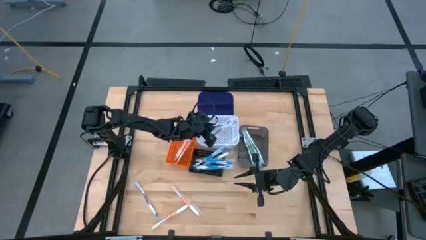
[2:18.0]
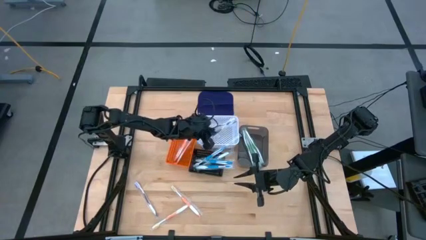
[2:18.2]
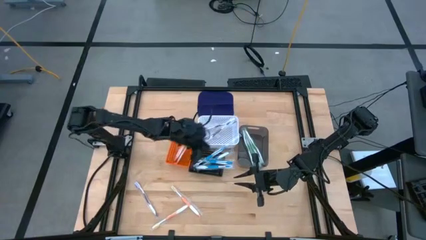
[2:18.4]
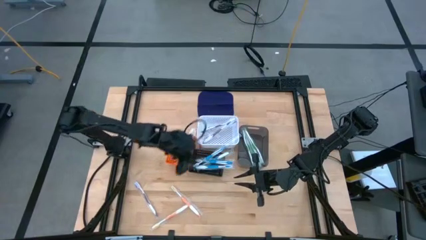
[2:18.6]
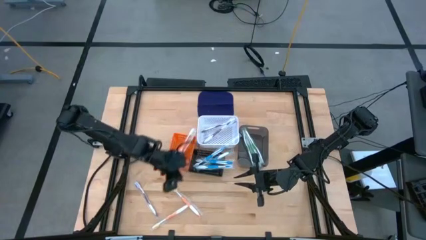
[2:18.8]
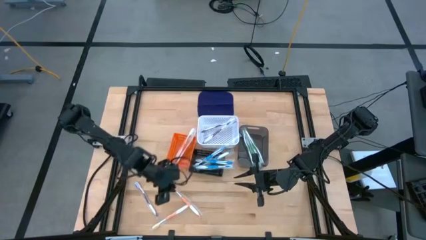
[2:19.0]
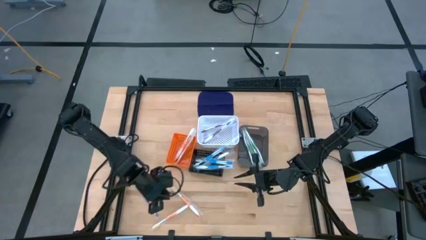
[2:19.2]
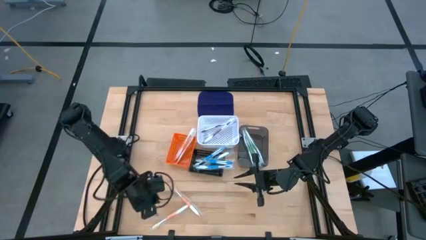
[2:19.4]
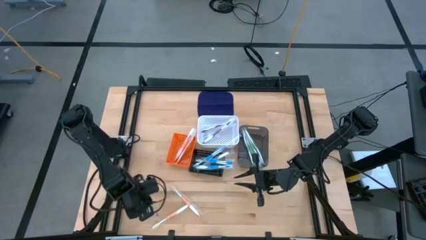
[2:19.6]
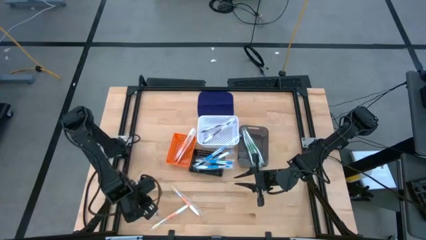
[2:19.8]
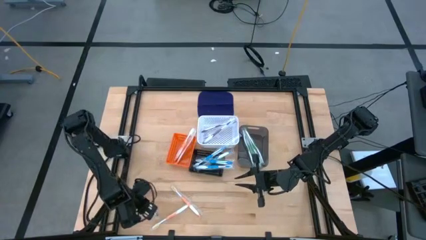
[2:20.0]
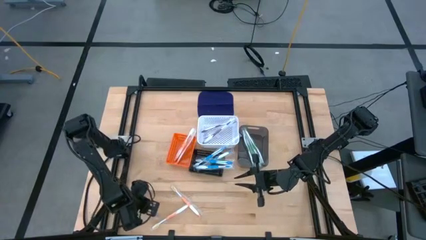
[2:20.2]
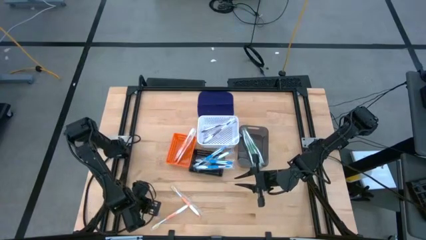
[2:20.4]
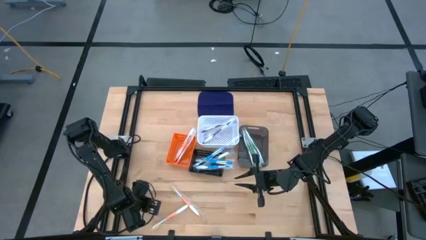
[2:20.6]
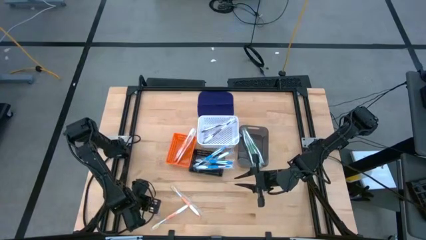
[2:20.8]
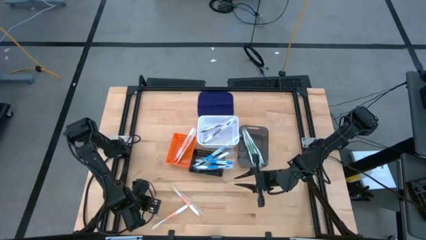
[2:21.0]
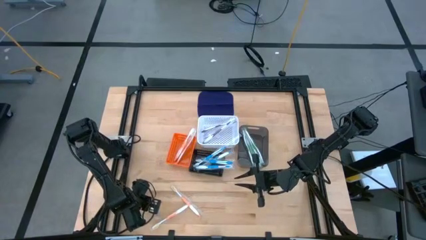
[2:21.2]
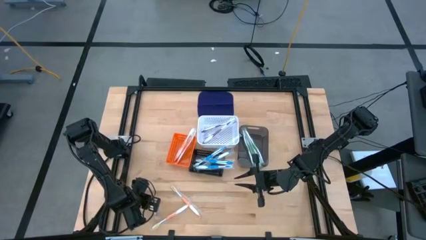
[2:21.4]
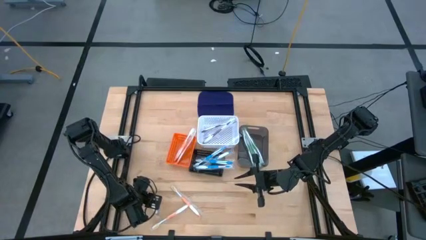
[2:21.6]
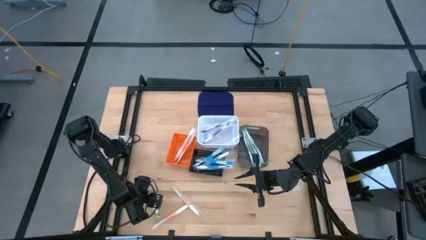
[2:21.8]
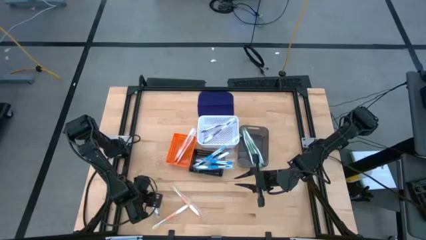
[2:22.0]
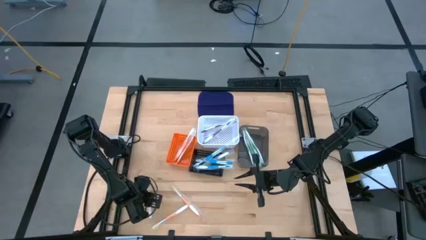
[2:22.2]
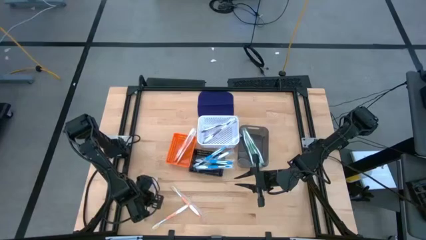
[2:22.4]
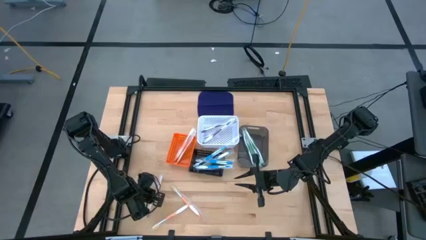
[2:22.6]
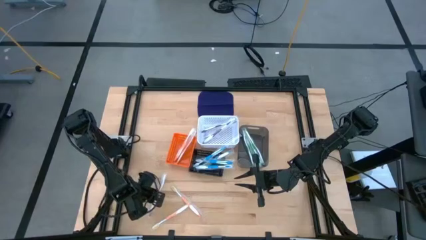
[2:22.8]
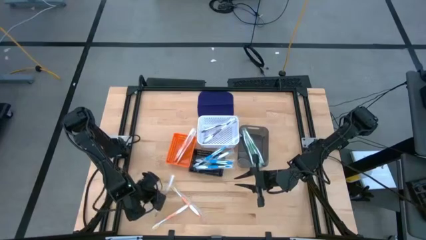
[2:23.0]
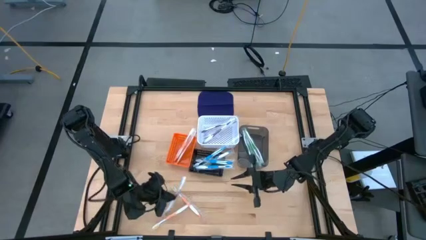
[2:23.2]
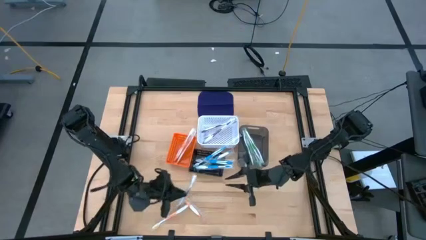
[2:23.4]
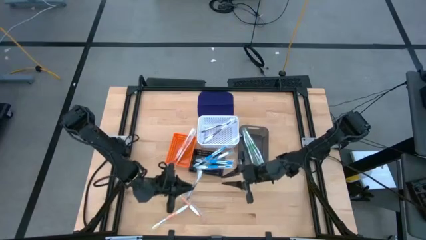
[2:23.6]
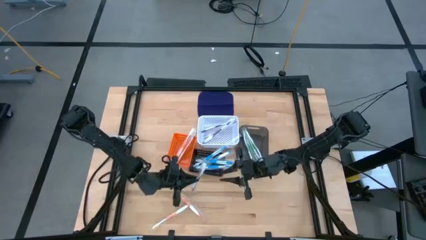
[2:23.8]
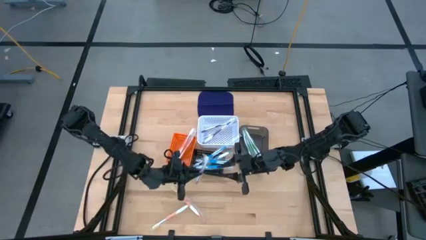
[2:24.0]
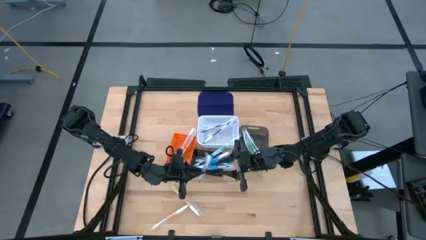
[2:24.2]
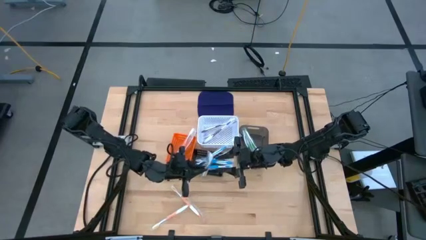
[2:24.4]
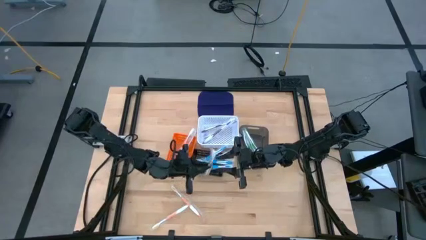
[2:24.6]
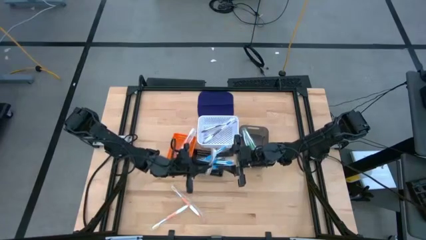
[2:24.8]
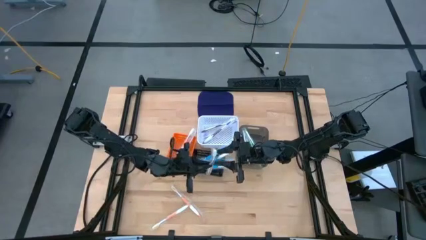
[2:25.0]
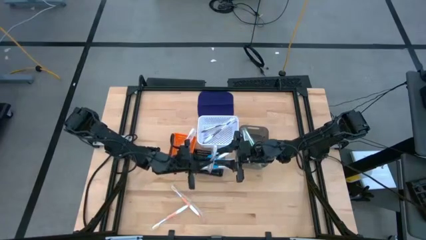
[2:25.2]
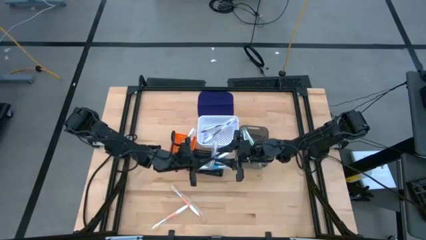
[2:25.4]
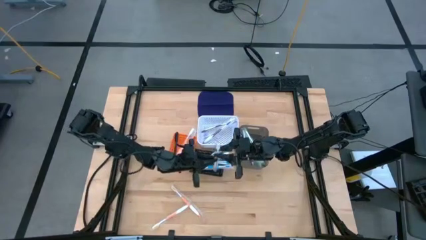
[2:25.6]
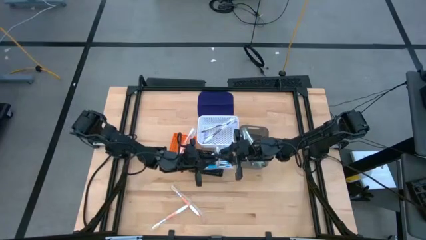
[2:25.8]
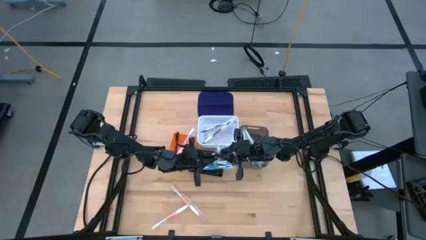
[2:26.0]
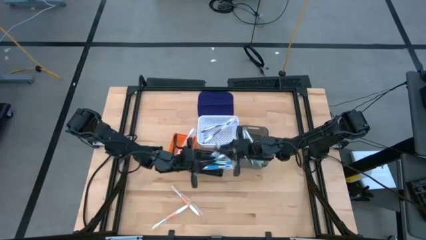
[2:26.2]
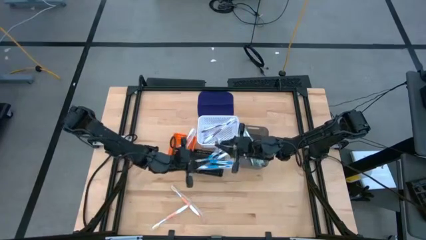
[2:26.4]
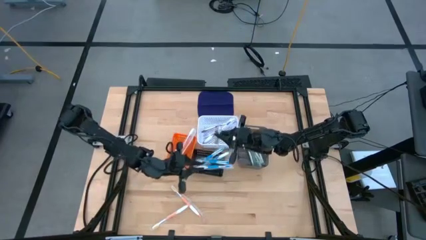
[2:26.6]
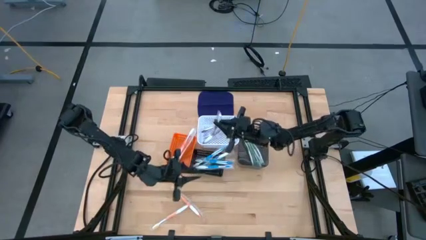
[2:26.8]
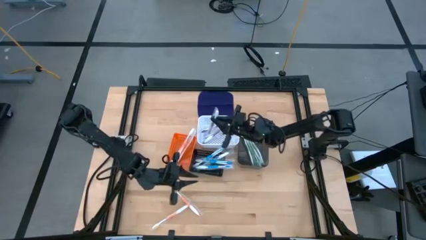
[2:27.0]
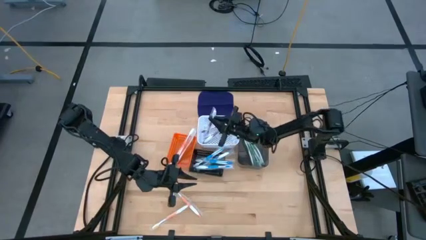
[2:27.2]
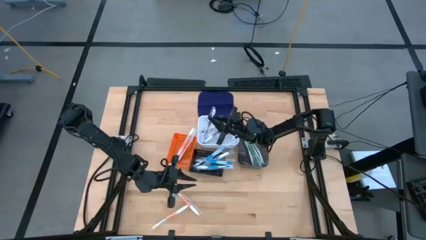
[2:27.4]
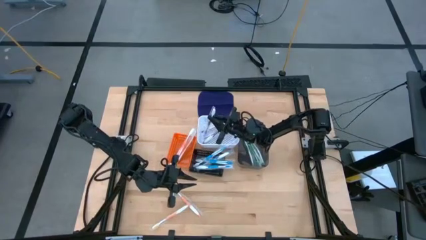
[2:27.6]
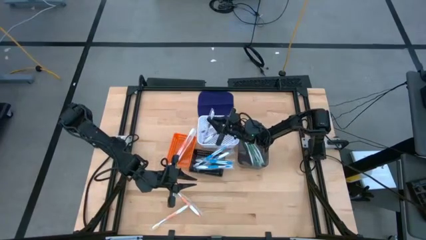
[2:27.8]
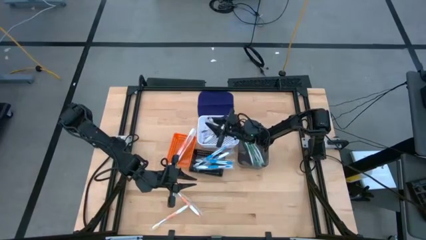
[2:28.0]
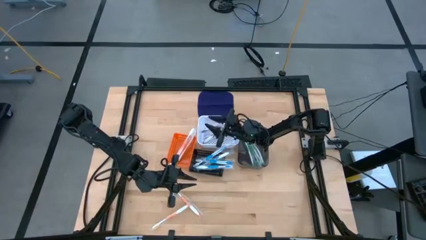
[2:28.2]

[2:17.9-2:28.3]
Task: Pick & Place Toothbrushes
Put the purple toothbrush into the white basket

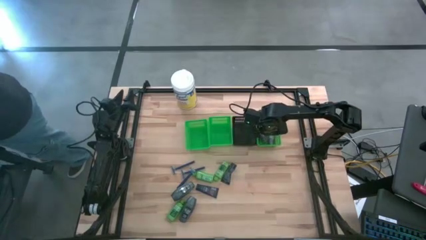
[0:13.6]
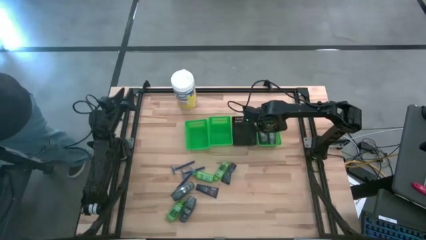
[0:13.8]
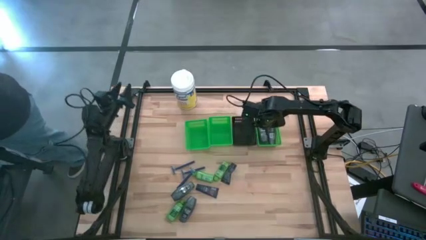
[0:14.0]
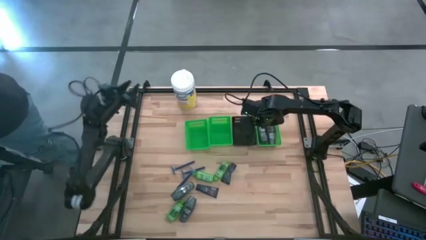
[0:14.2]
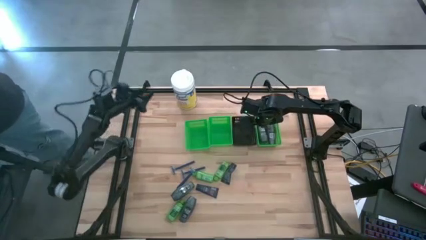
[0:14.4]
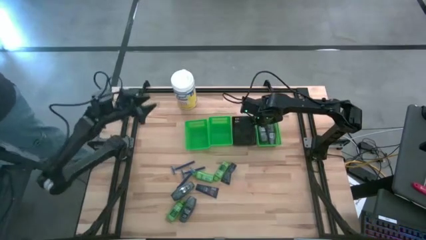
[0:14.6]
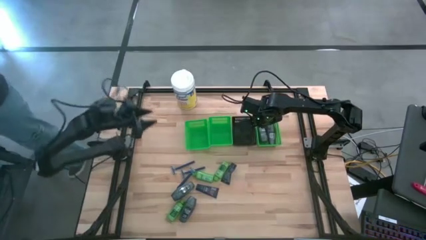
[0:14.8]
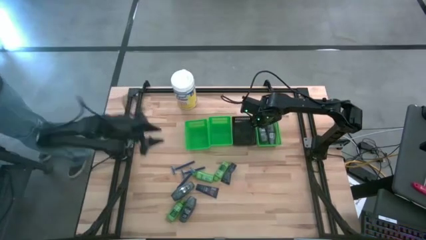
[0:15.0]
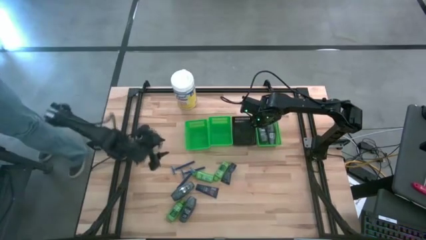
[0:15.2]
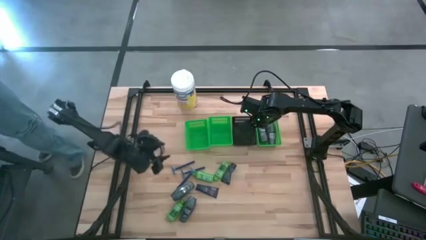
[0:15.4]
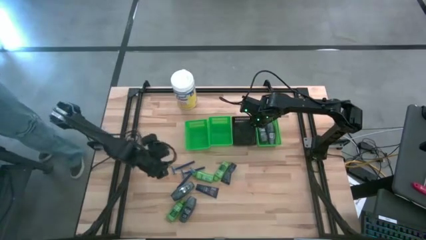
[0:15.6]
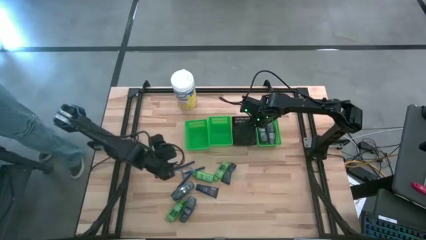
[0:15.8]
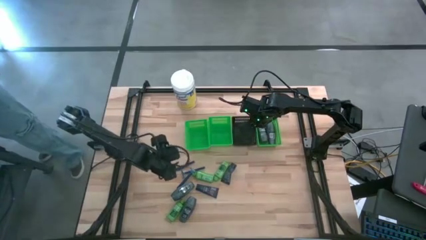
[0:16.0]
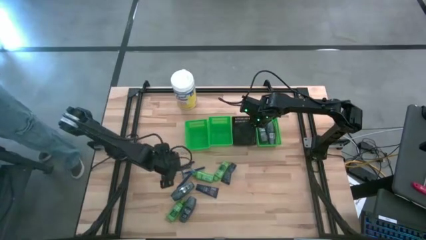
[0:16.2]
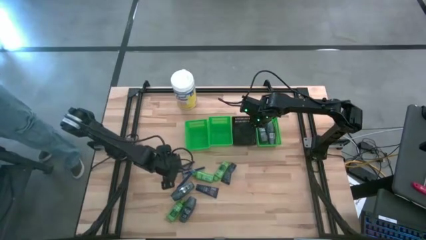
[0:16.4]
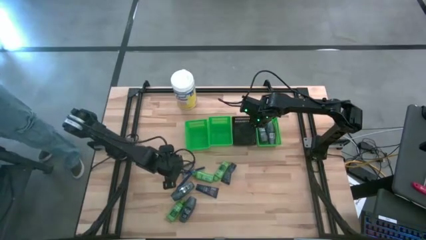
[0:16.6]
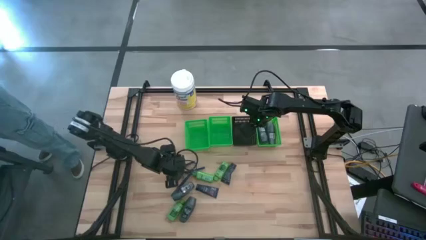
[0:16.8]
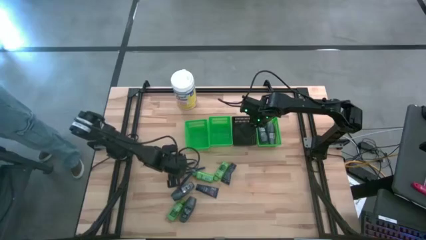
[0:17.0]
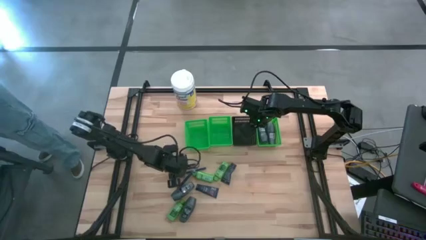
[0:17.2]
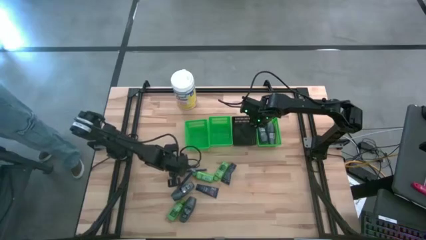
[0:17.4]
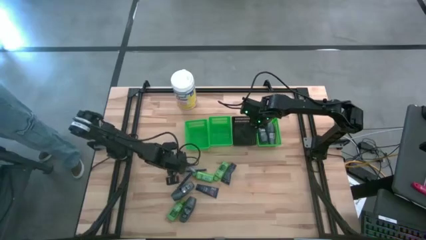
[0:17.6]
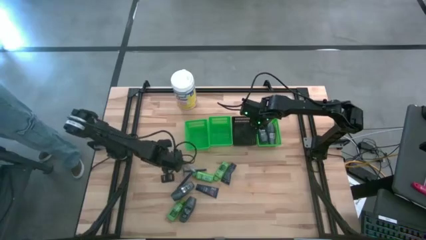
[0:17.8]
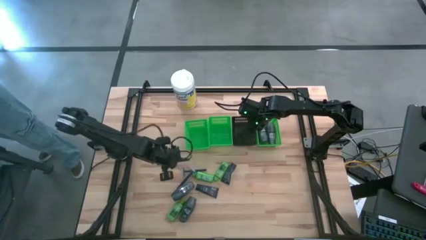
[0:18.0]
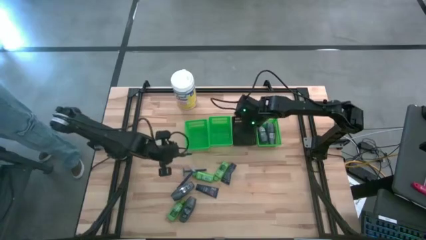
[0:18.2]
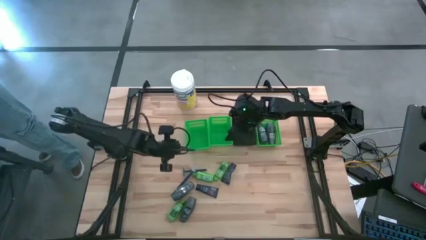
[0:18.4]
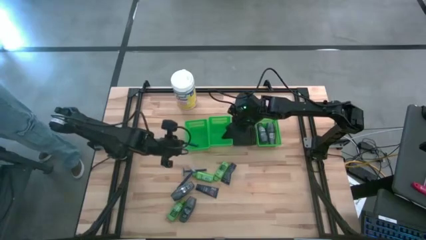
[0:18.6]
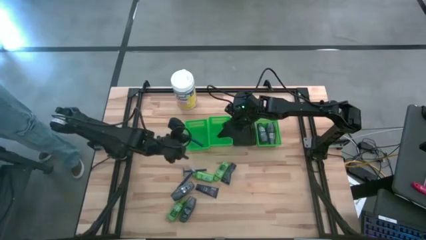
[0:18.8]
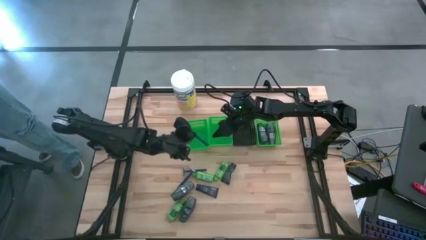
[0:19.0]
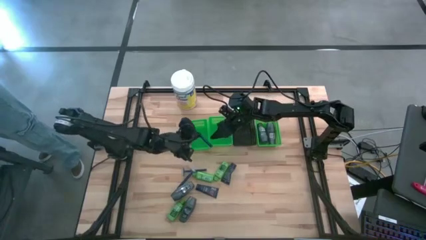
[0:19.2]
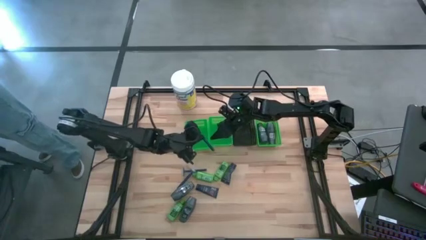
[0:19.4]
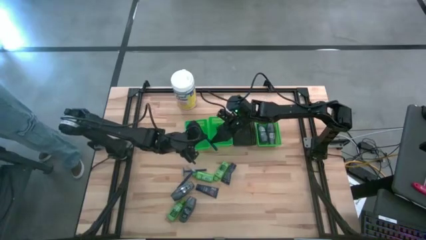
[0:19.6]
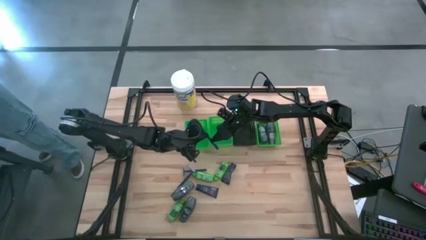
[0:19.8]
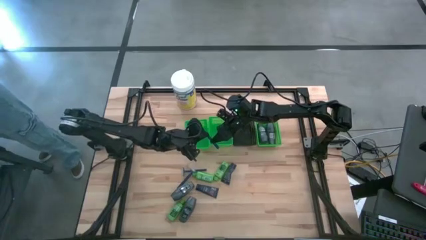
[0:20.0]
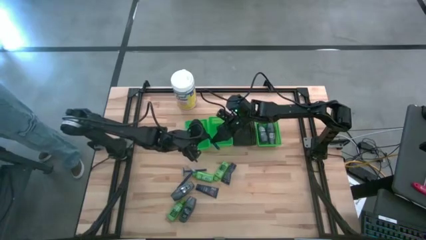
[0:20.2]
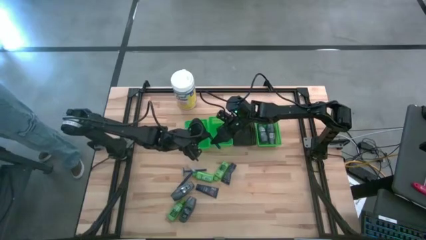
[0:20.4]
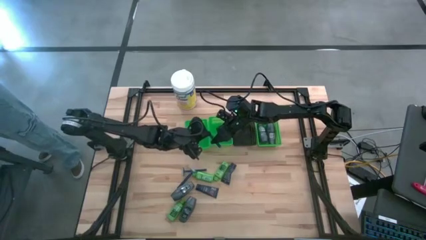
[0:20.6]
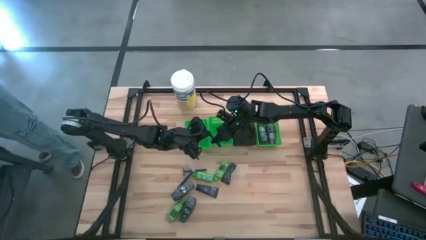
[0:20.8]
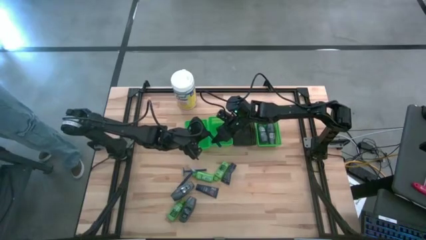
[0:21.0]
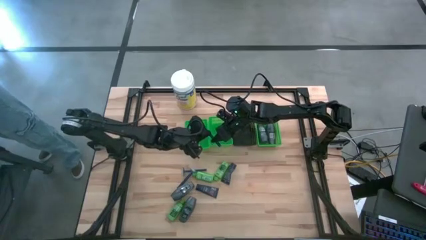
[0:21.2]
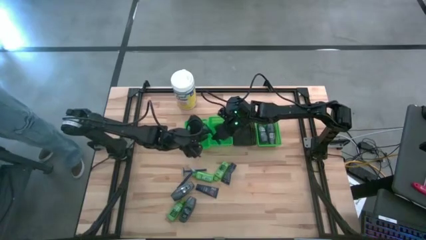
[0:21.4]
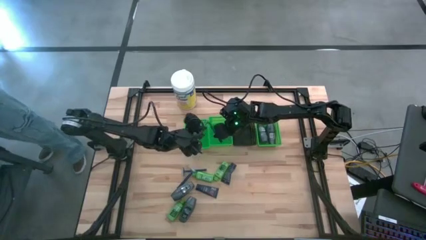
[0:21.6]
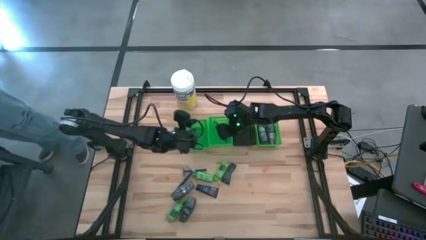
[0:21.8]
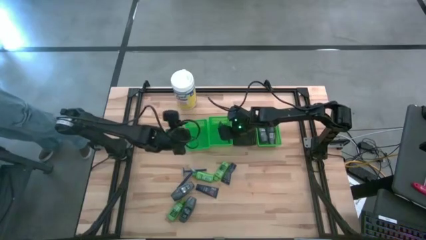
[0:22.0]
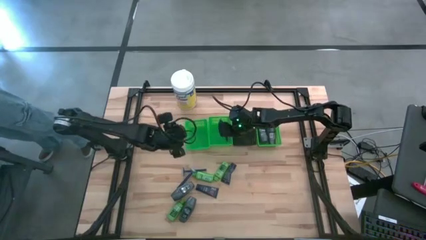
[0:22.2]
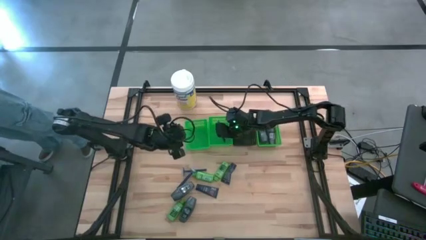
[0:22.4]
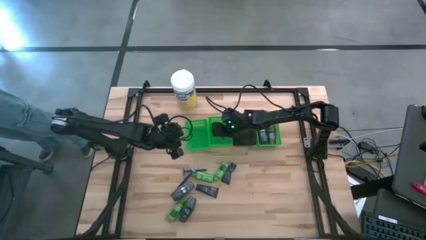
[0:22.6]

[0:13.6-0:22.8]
Task: Pick & Place Travel size toiletries
Put the top razor into the middle green bin
